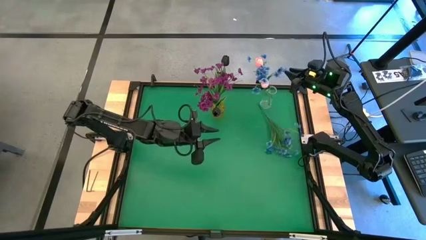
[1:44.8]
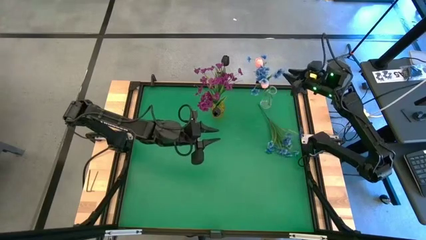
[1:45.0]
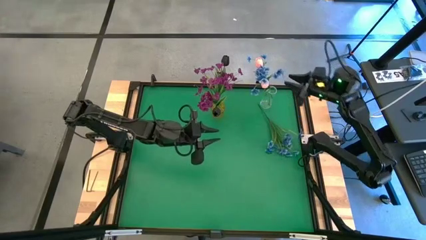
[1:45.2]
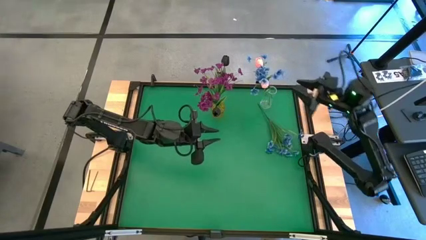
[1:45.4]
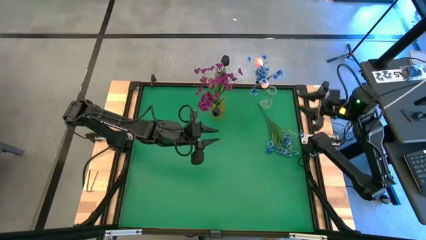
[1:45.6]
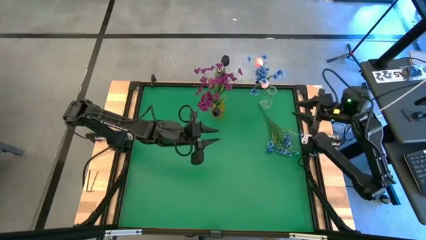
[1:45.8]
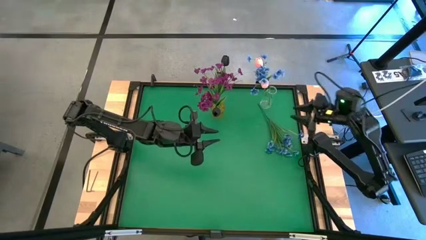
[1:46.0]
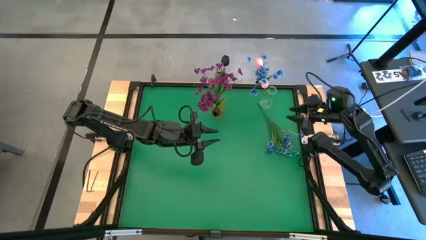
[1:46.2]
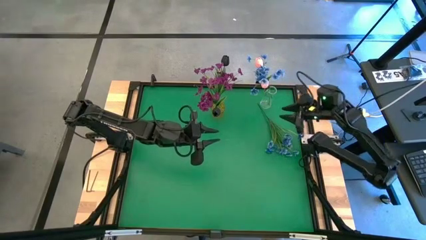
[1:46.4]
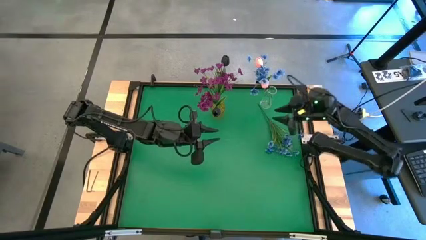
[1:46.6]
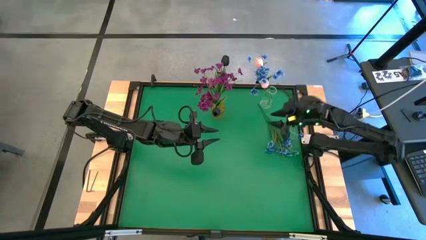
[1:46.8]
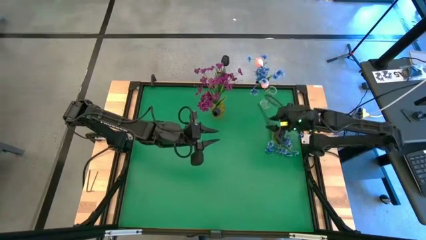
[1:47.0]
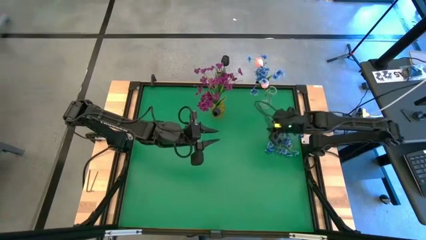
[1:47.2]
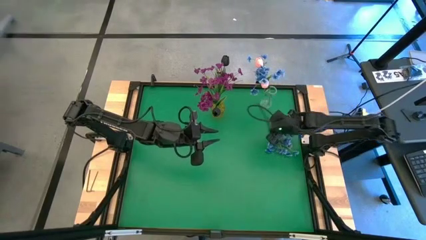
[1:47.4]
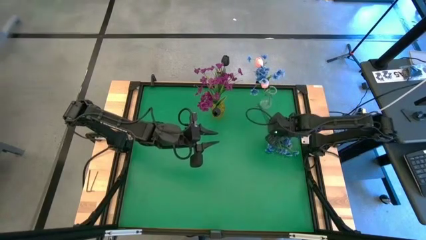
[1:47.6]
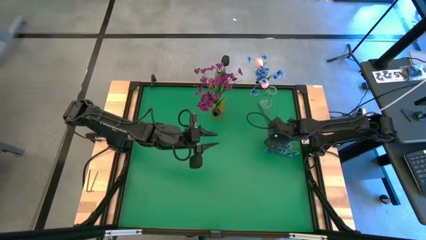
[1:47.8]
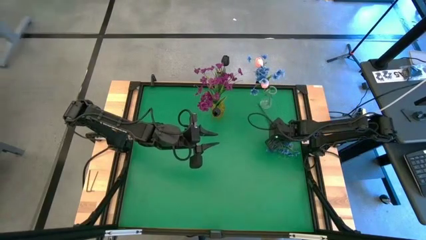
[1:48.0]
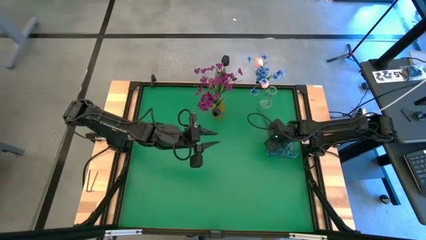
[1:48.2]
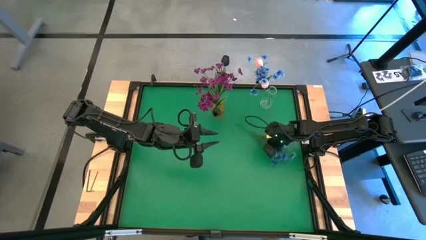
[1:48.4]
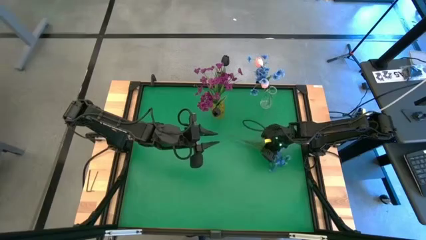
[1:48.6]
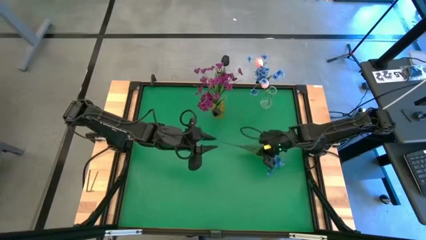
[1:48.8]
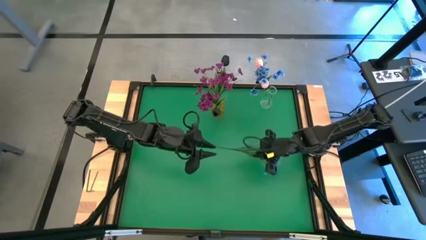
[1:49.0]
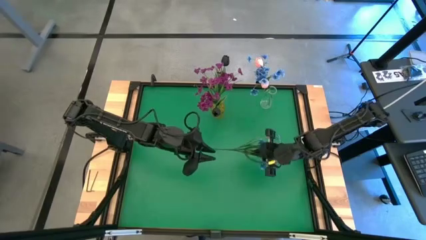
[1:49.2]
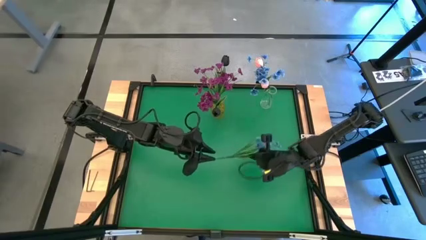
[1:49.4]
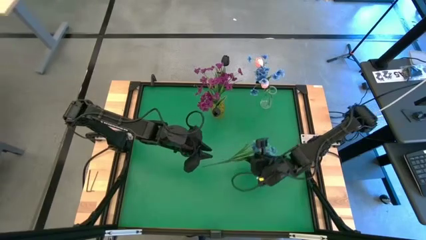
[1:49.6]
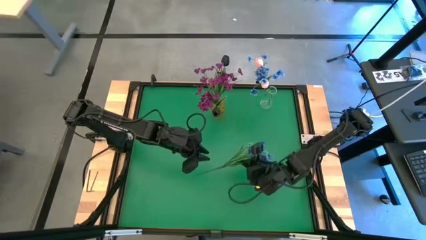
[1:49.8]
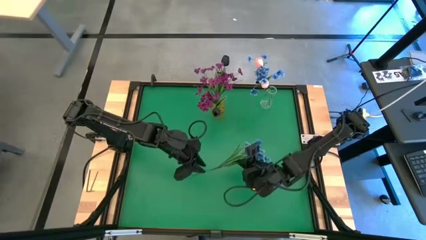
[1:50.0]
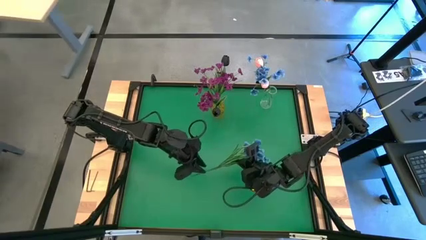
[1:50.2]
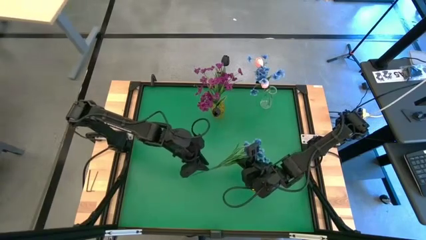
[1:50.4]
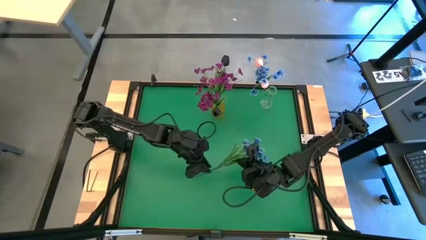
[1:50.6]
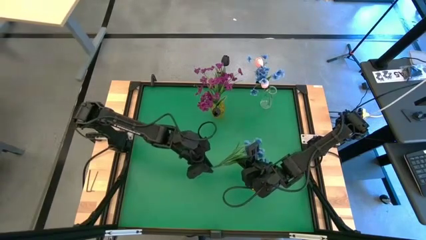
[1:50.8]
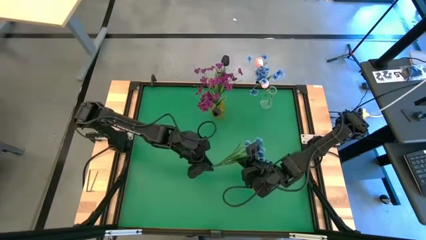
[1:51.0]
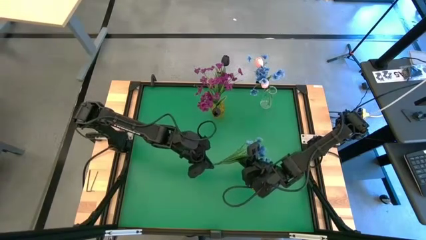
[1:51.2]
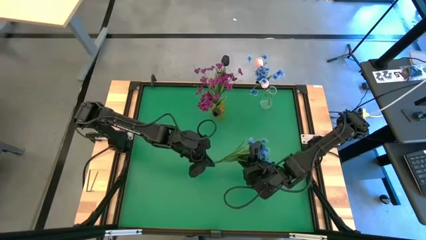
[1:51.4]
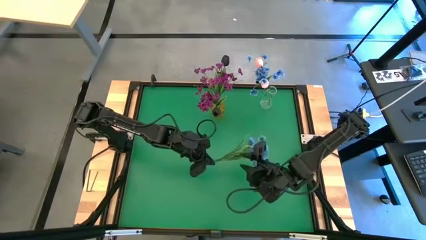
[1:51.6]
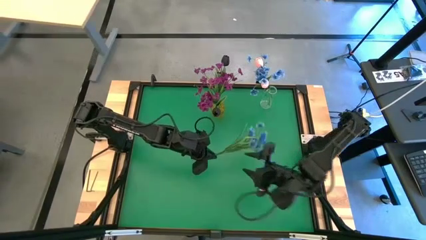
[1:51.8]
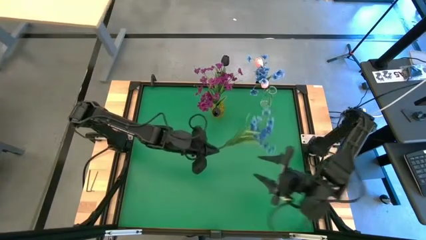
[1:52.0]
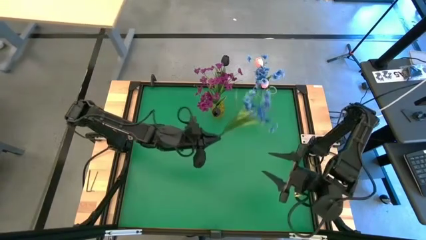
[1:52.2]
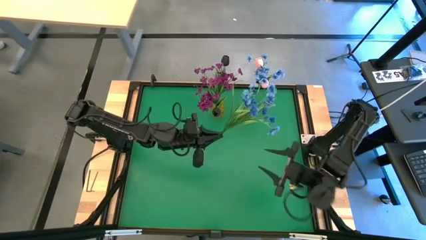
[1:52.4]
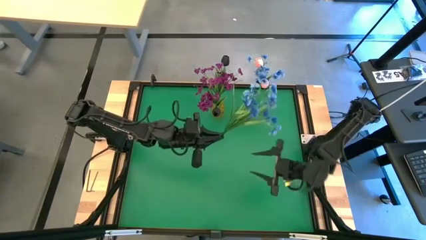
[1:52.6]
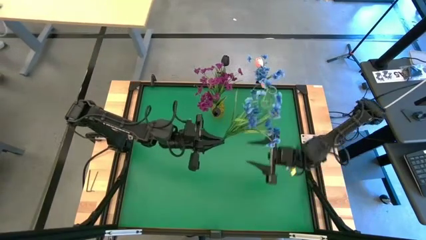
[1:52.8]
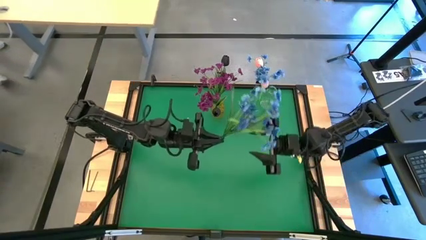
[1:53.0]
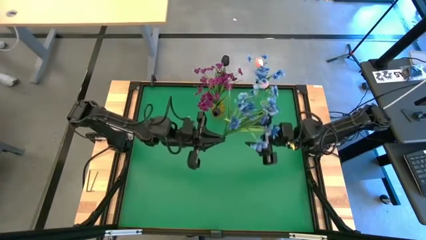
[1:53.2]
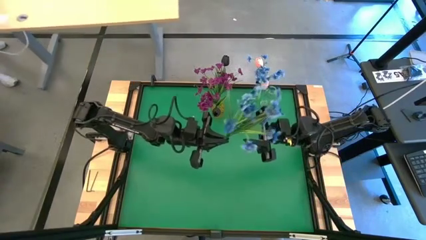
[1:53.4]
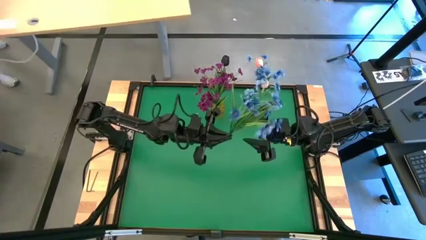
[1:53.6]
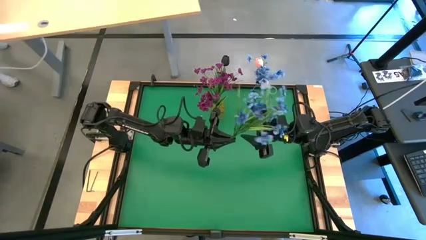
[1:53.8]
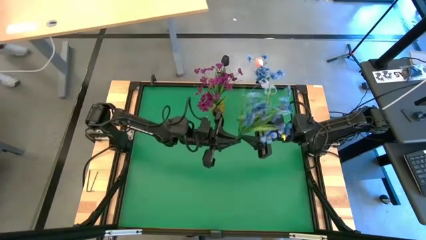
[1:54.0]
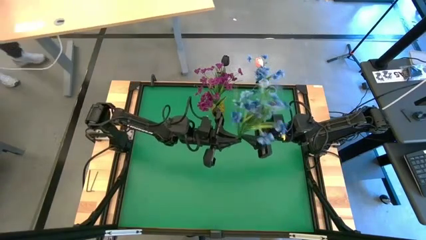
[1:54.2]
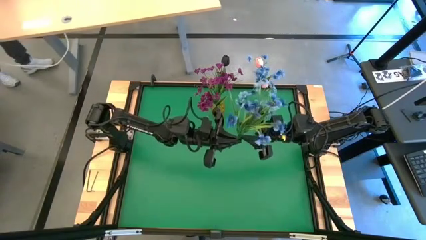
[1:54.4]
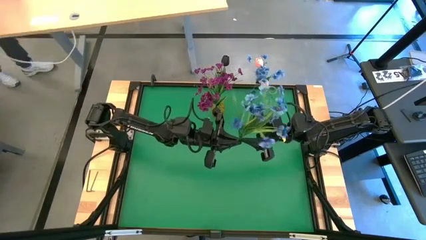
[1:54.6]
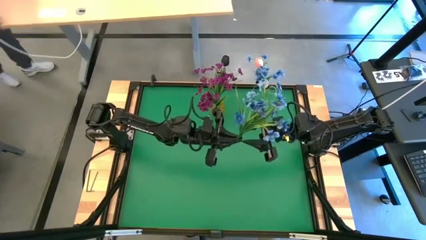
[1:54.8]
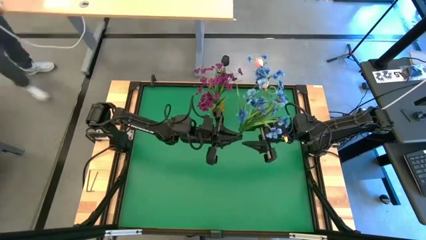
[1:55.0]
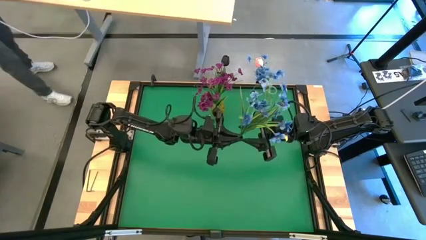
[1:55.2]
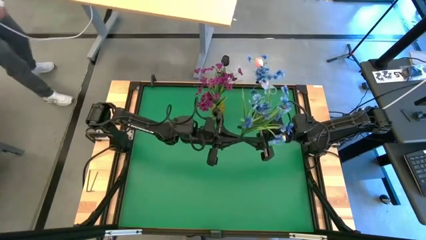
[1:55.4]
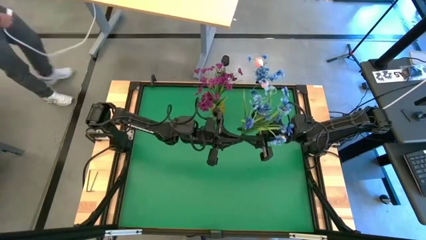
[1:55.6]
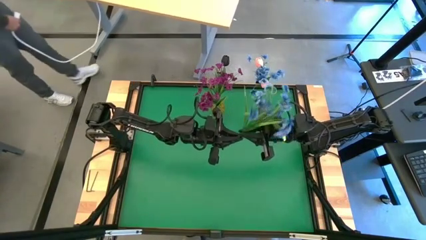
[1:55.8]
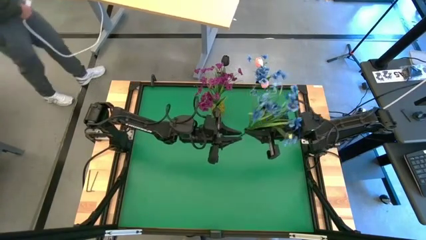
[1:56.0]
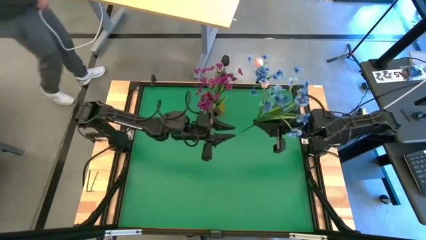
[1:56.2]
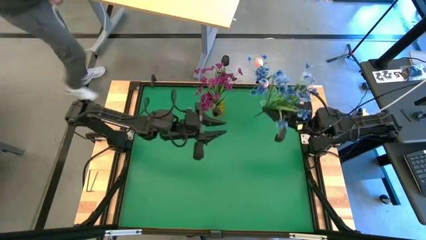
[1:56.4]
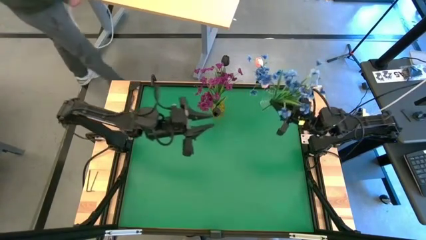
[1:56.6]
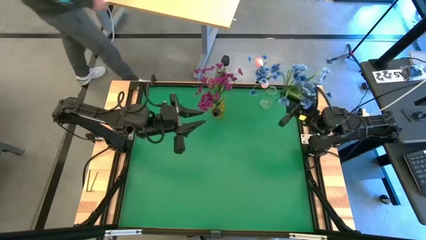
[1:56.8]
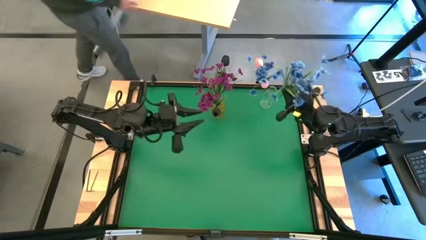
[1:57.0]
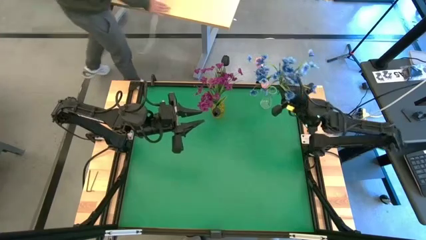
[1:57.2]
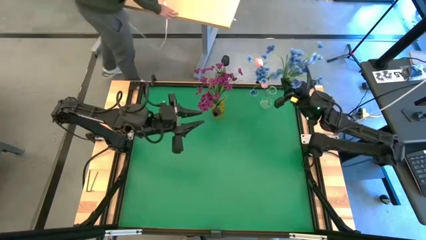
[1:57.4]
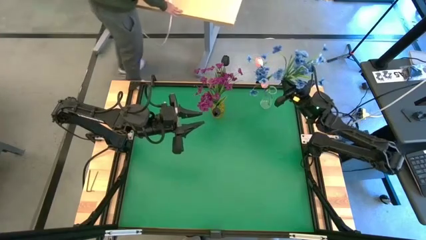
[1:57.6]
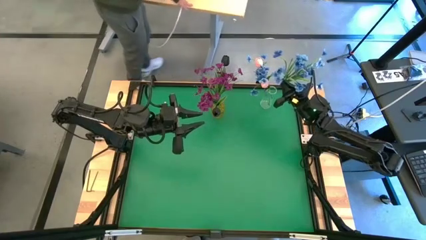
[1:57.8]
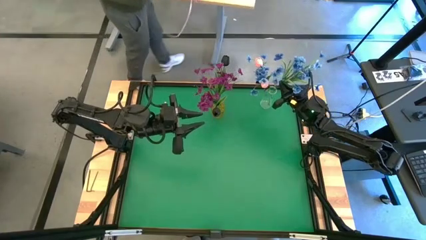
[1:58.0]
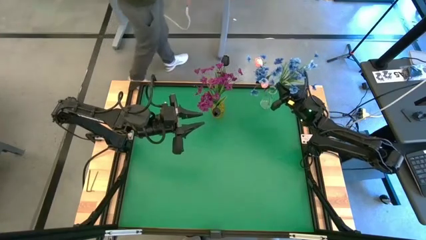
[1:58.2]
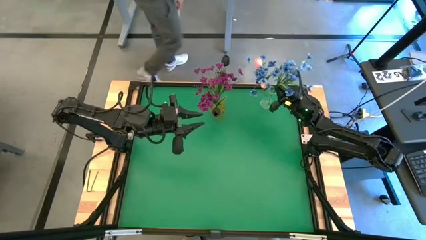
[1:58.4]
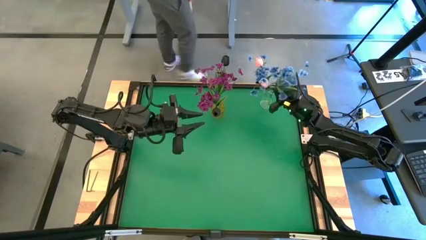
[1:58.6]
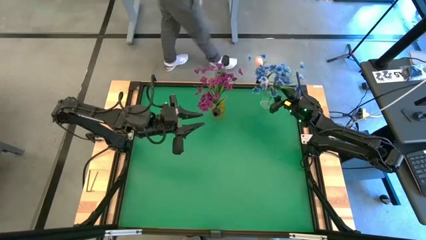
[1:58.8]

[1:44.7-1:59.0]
Task: Sort flowers into vase by color
Put the blue flowers into the transparent vase

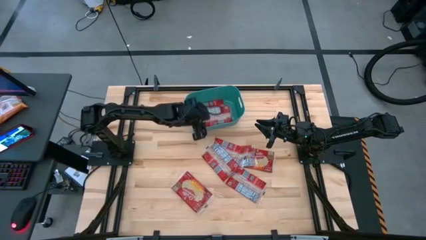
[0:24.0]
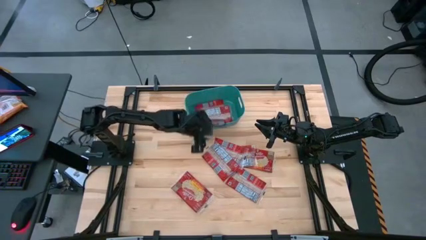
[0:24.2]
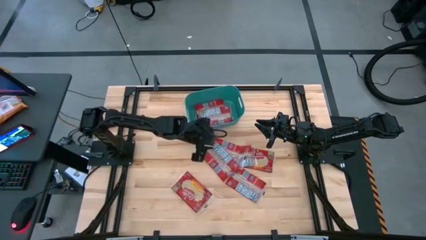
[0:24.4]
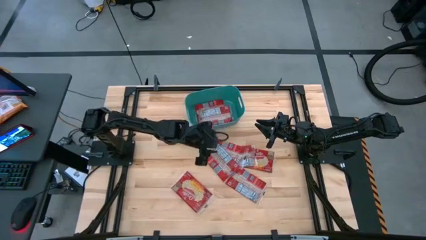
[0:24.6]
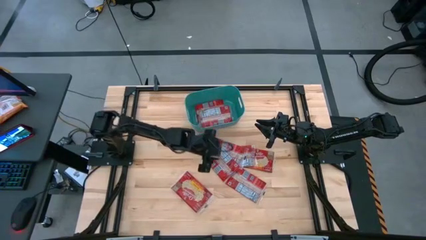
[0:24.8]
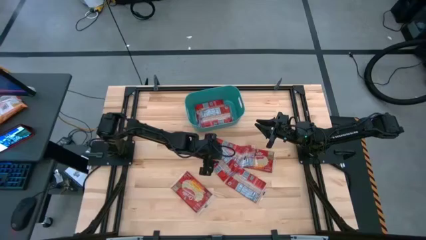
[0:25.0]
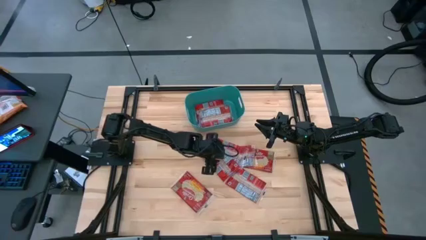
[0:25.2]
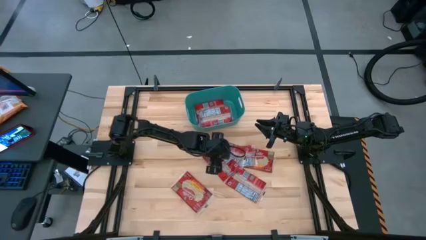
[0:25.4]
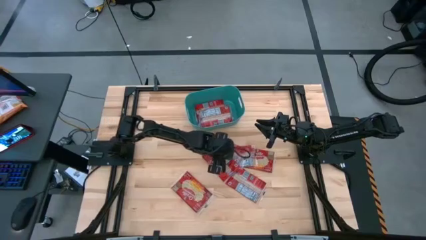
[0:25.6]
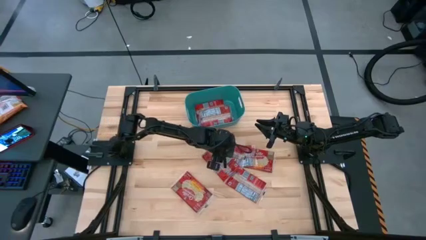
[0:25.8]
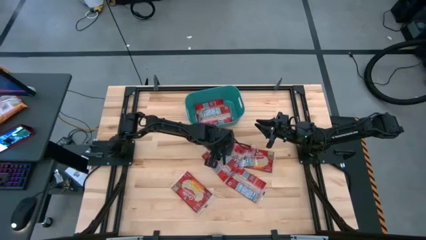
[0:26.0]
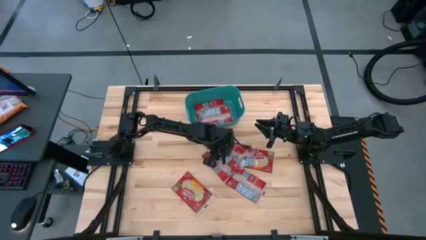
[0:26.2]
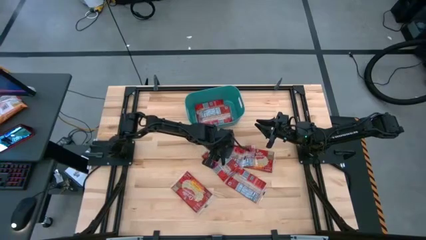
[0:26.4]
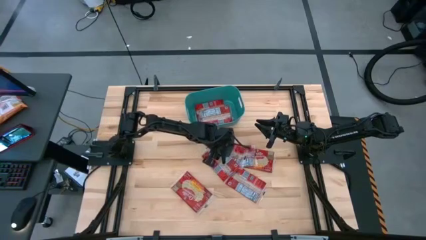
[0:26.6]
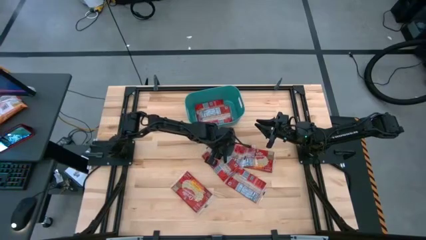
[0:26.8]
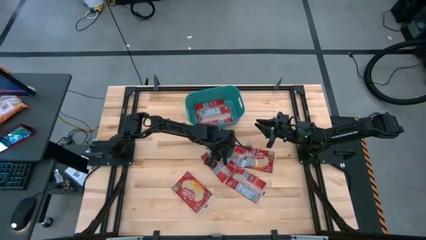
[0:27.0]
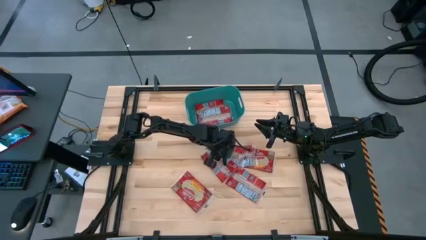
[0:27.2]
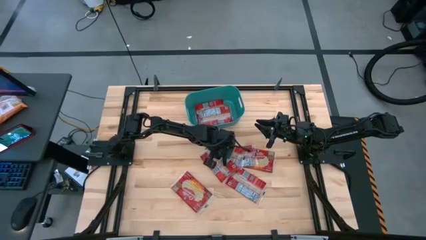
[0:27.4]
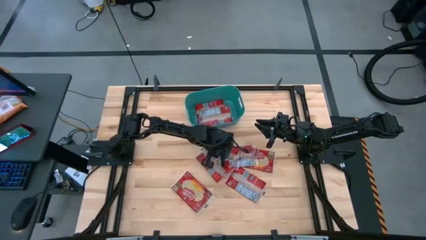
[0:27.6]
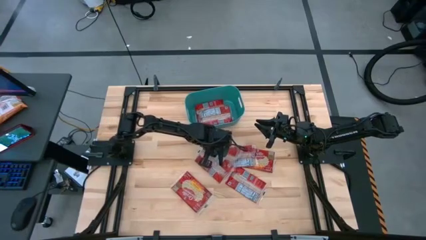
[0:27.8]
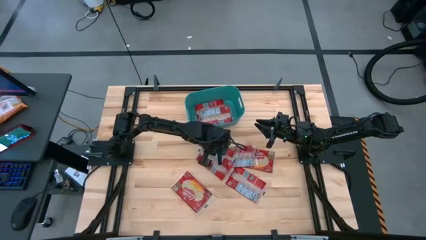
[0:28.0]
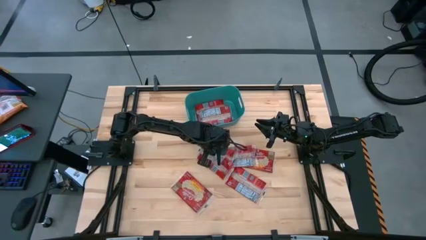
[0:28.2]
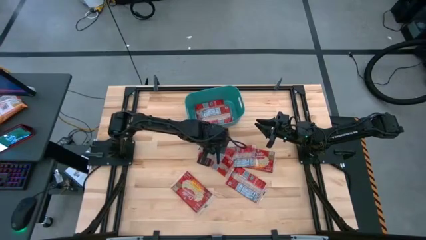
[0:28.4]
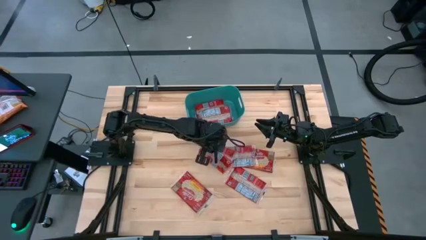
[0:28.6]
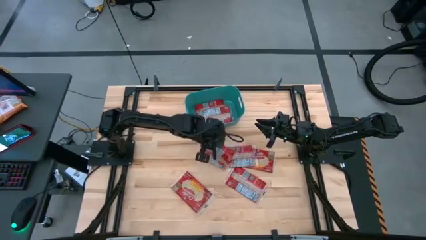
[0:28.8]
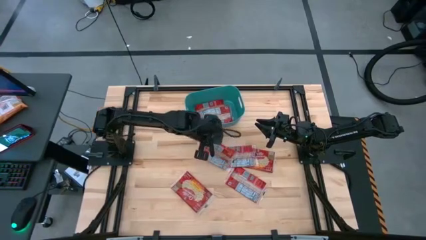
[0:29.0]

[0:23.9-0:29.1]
Task: Sort popcorn bags into baskets
Put the red popcorn bag into the blue bin
